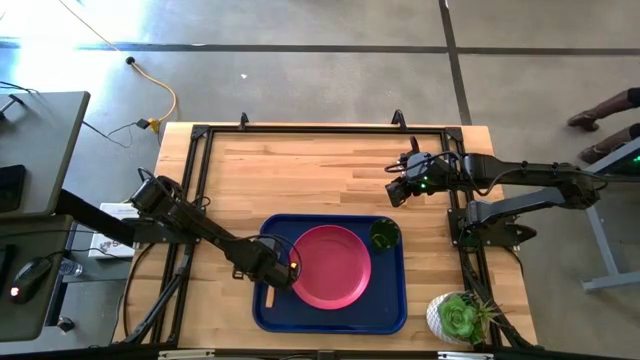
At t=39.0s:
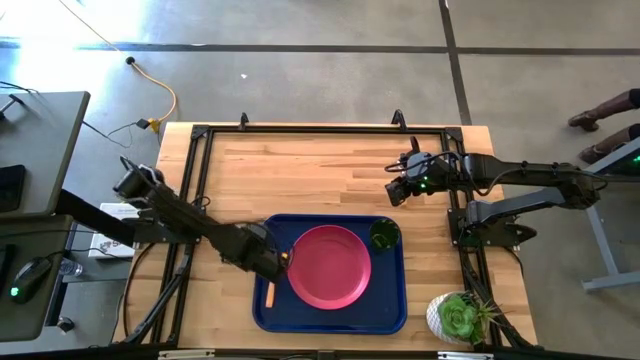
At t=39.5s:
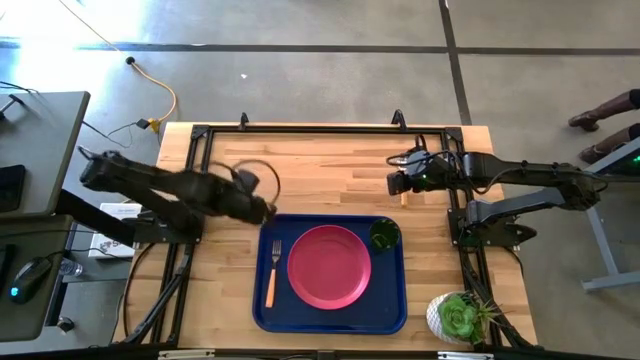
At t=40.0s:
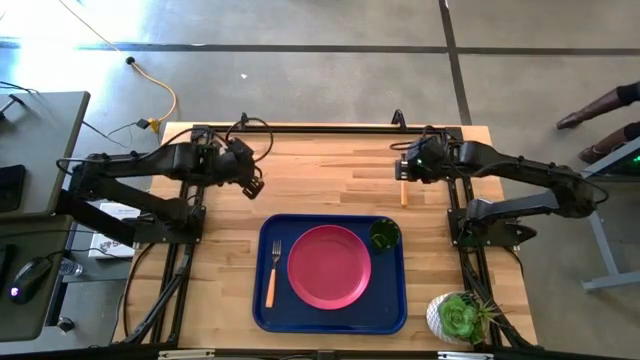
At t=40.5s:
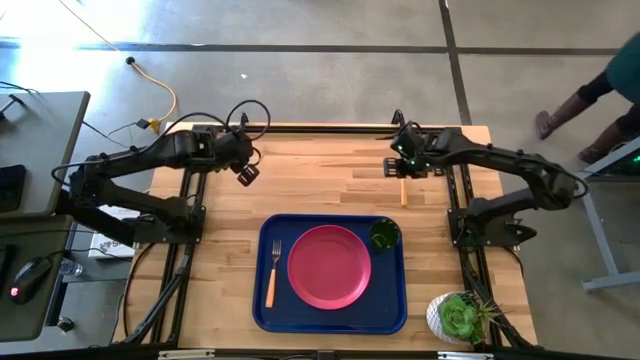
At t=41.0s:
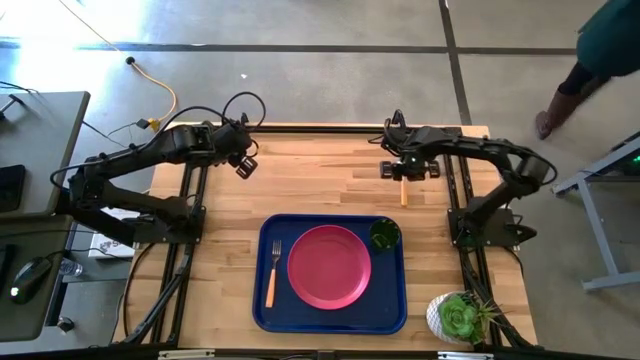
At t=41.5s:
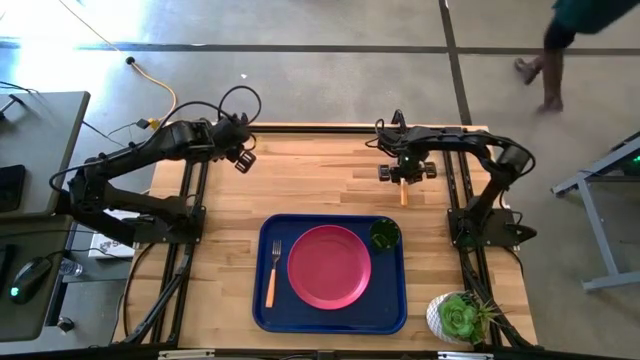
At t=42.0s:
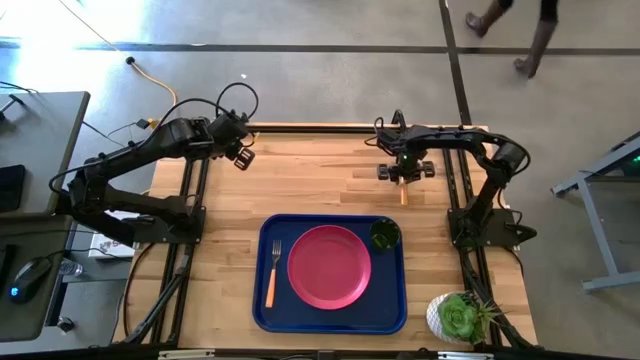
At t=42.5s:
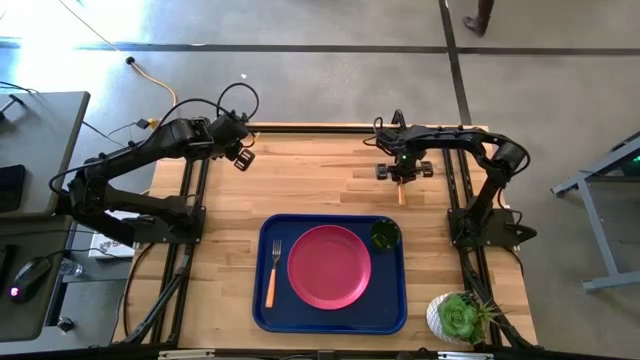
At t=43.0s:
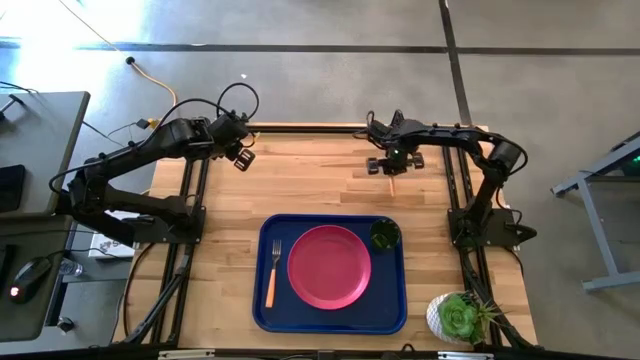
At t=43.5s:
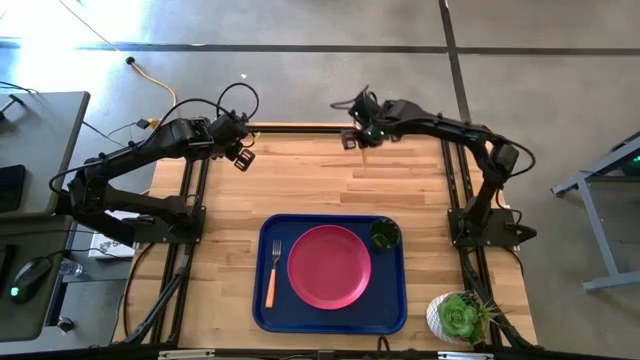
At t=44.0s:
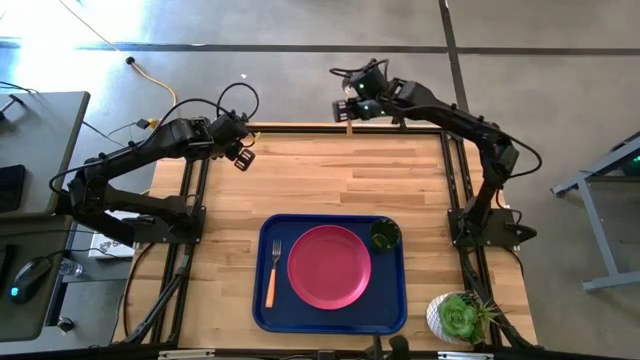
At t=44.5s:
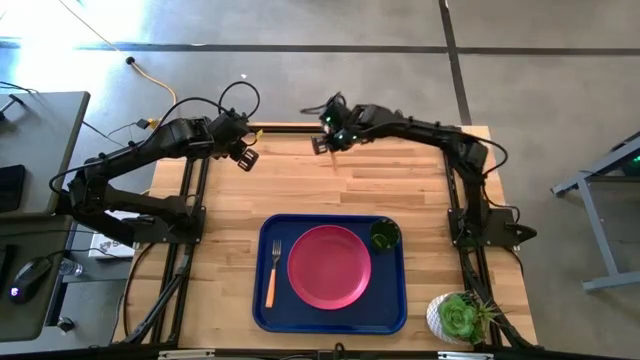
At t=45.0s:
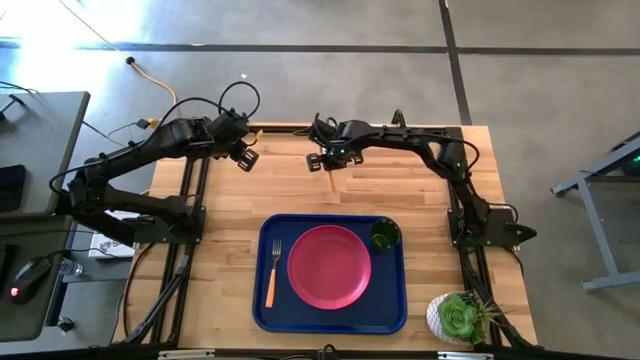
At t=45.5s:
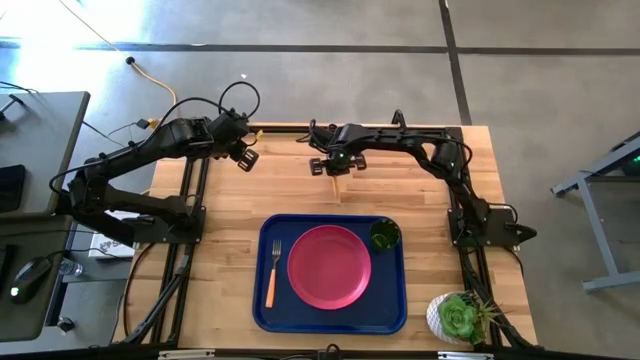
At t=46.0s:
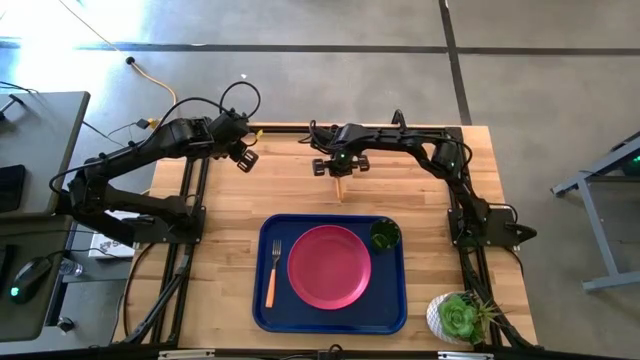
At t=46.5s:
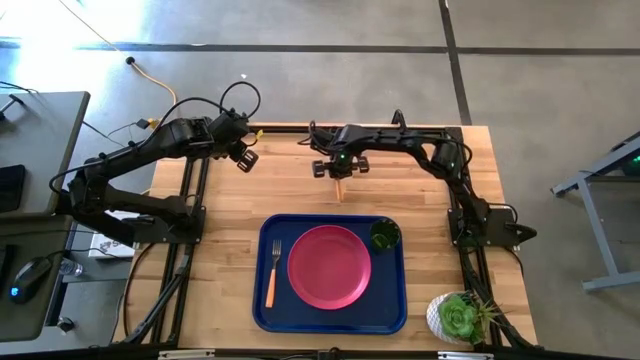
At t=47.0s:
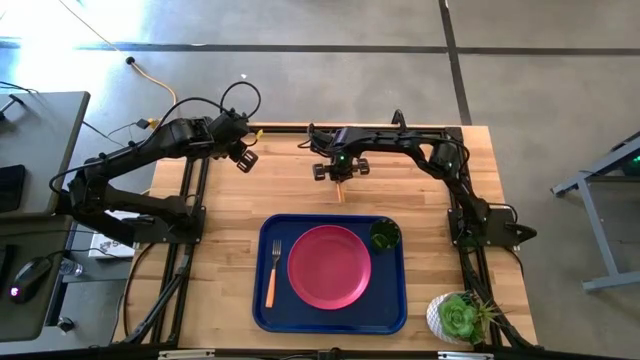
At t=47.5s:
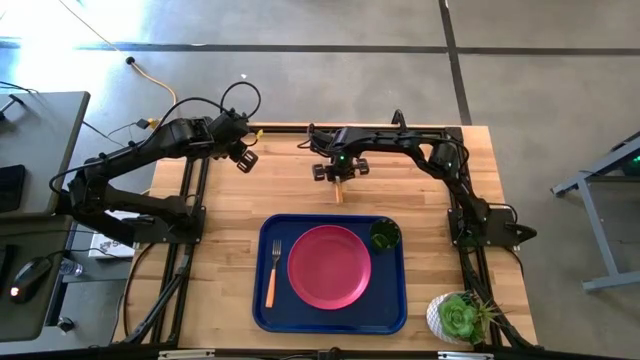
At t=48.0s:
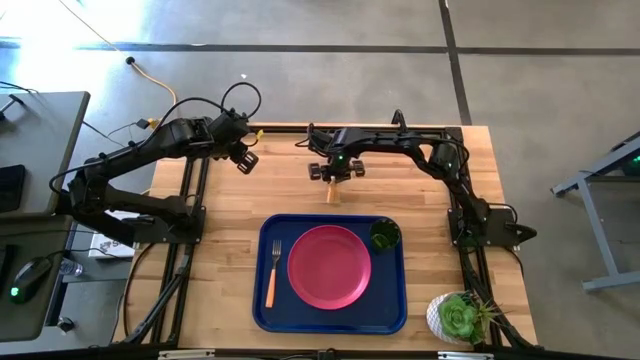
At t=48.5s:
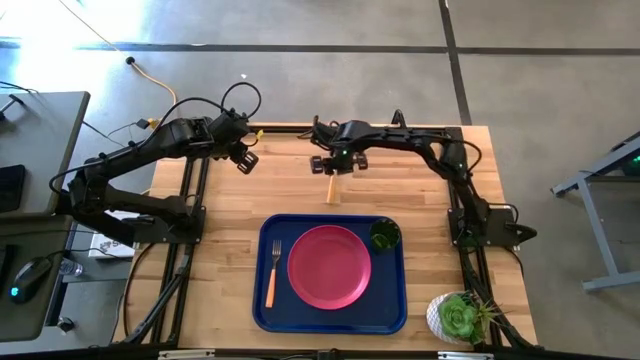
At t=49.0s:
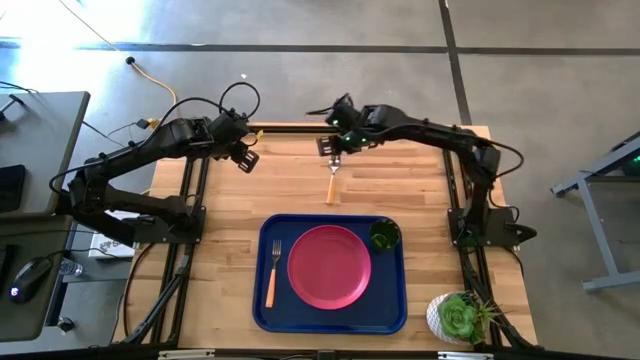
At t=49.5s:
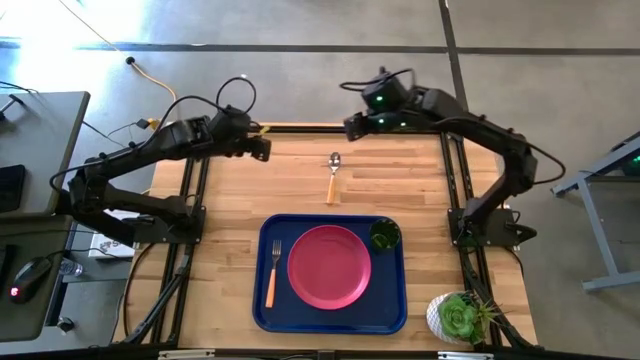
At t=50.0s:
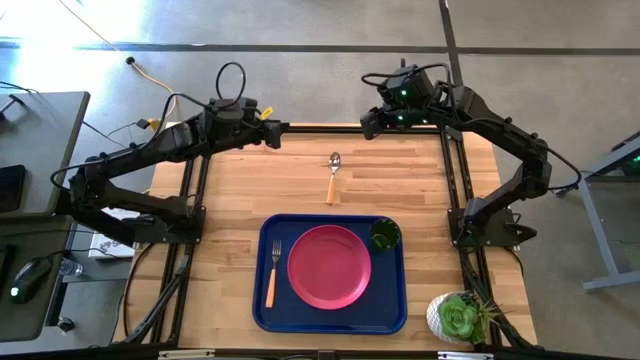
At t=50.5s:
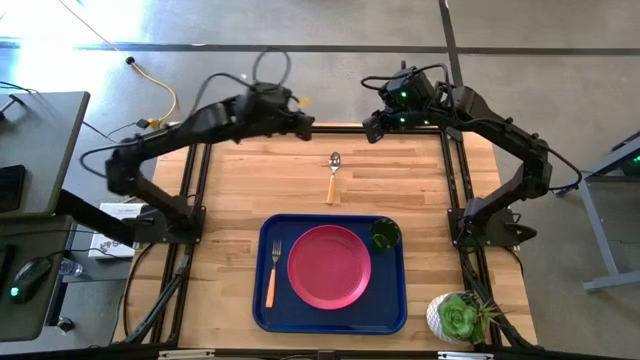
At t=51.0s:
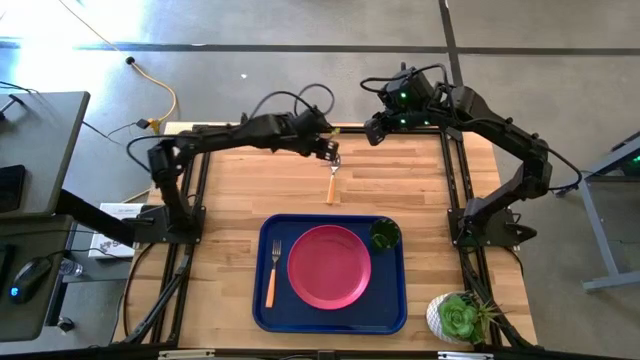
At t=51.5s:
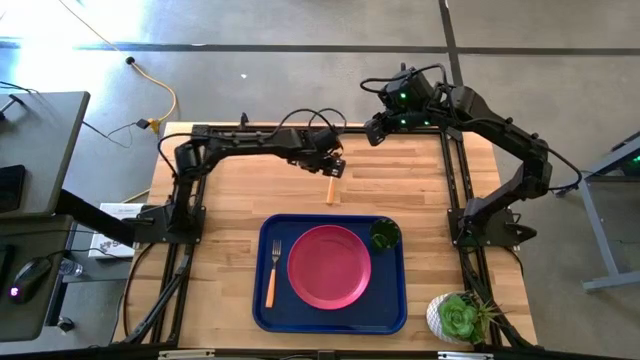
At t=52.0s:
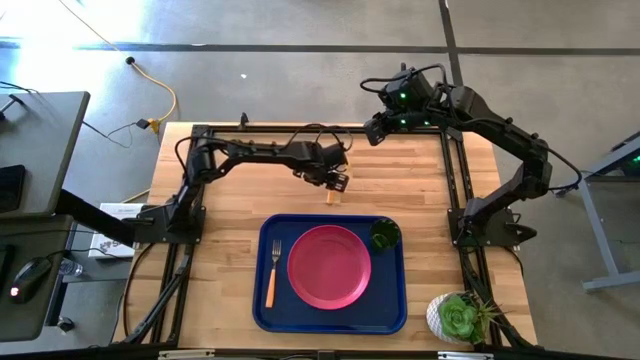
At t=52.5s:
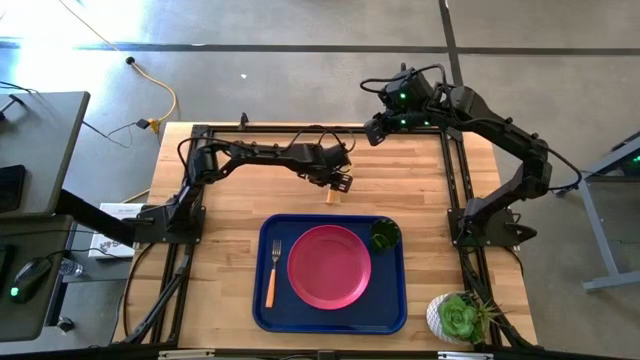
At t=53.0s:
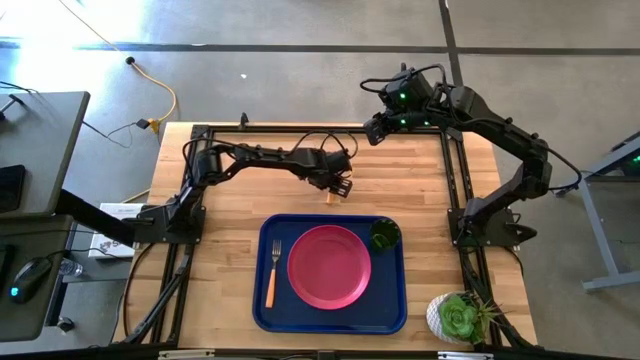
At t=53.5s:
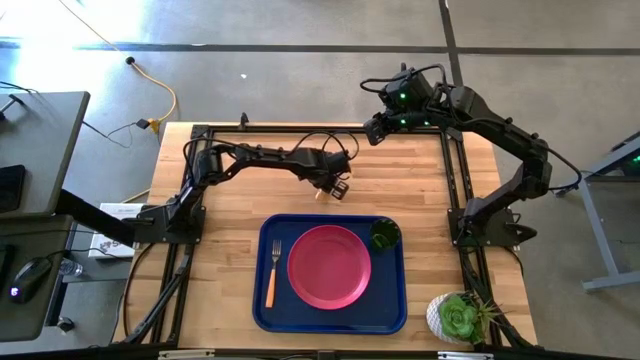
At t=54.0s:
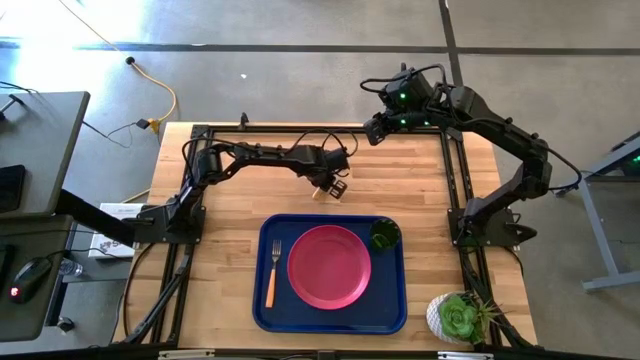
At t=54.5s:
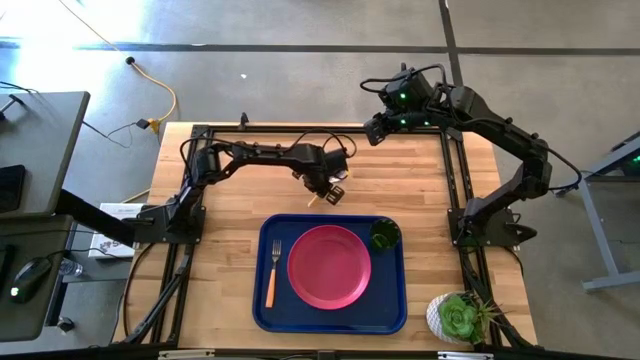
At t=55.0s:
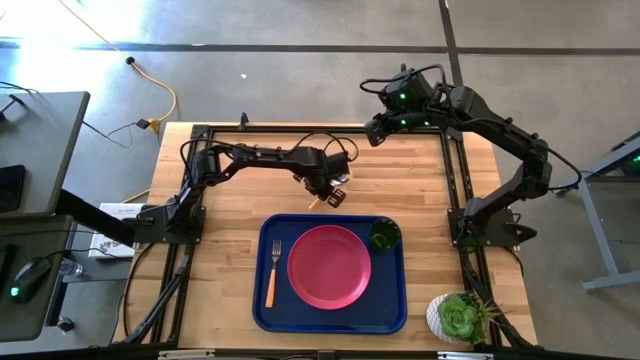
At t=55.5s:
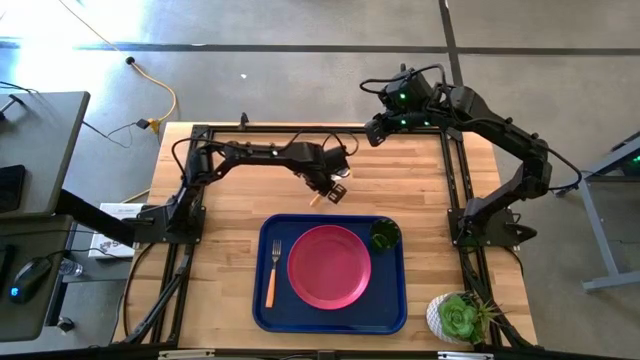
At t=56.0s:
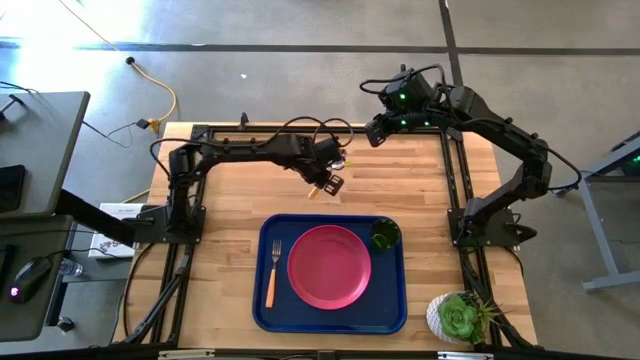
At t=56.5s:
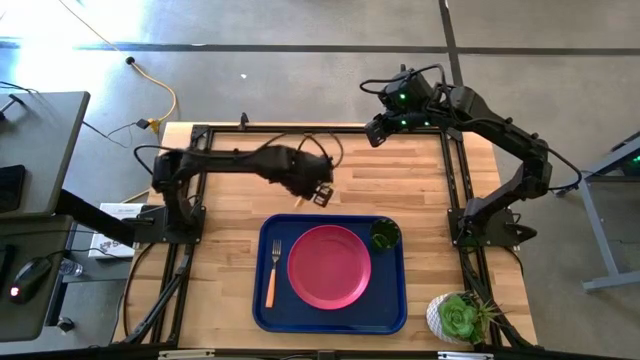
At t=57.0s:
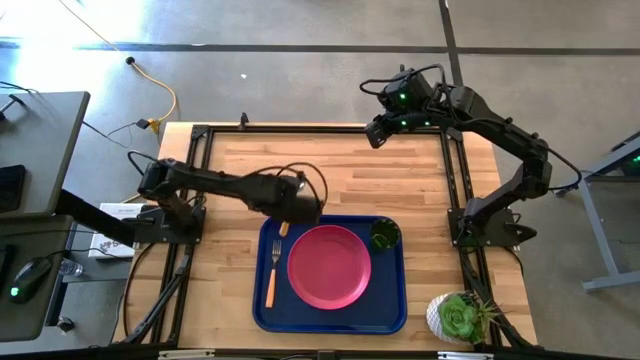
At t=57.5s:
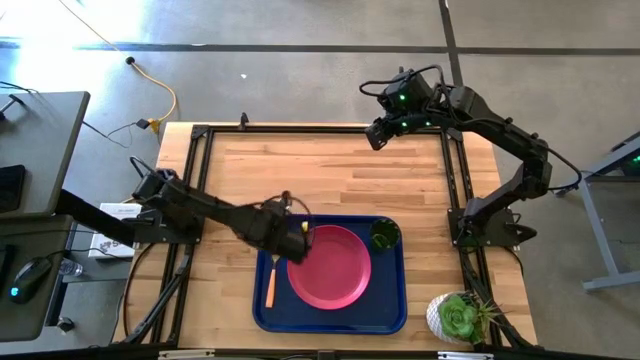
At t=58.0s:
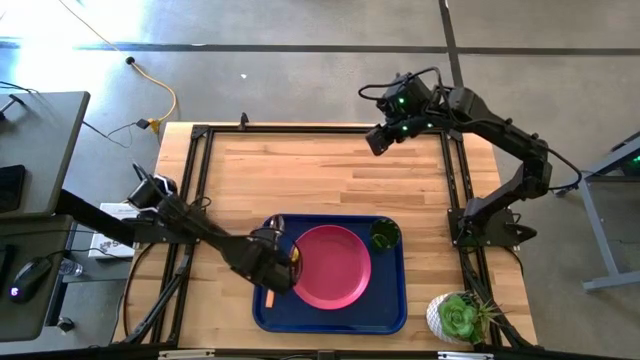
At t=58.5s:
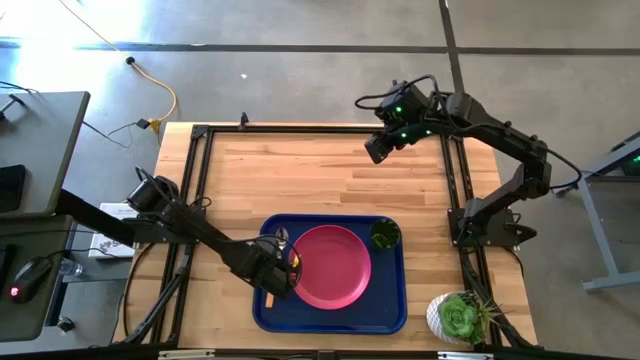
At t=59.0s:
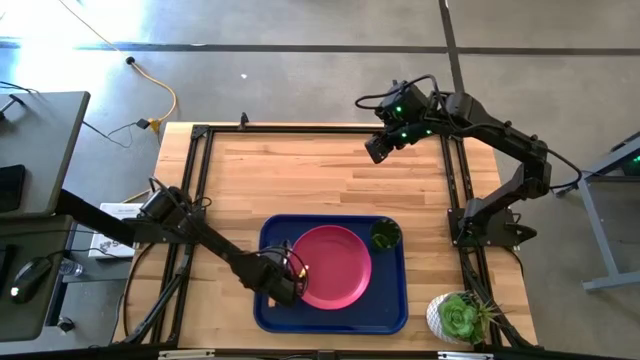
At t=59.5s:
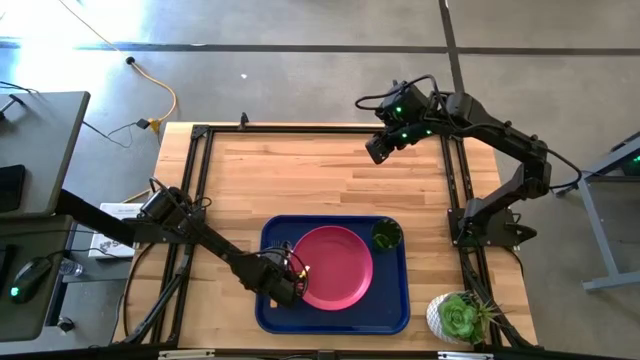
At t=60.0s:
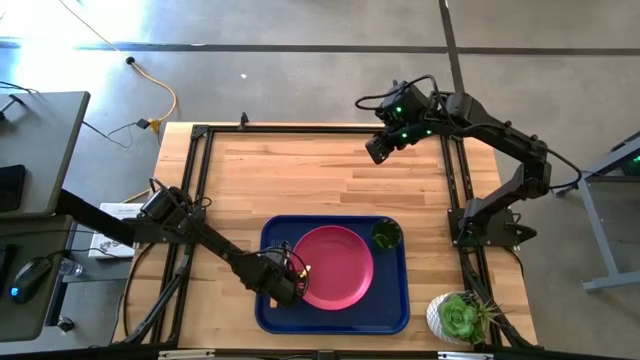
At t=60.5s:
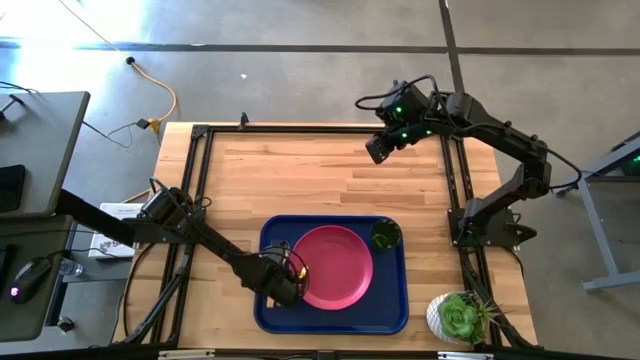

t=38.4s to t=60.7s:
Task: Pick and place plate/cup/fork/spoon on tray
Put the yellow spoon on the blue serving tray between the yellow fork and pink plate
